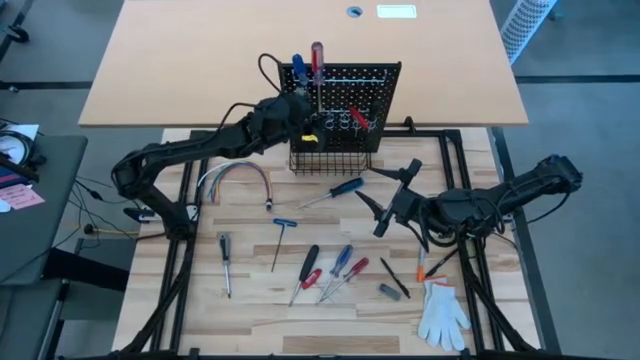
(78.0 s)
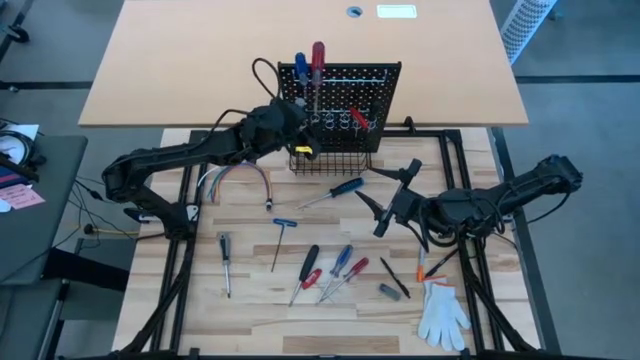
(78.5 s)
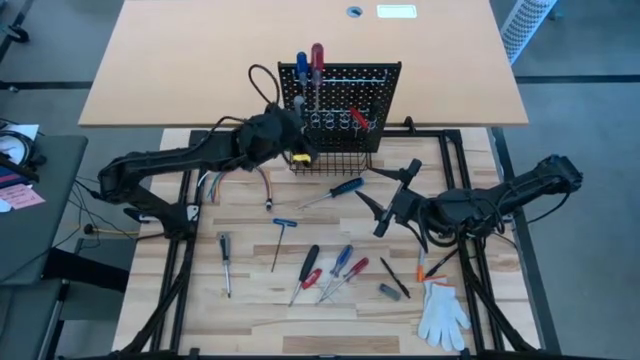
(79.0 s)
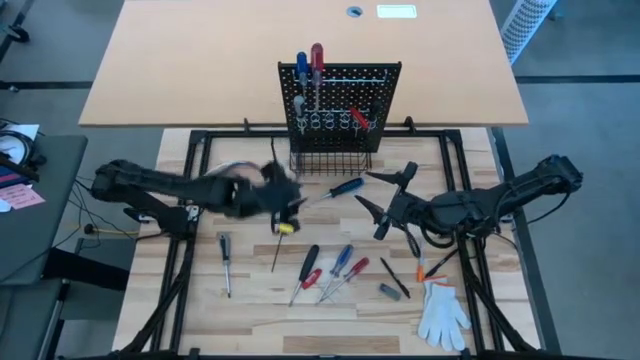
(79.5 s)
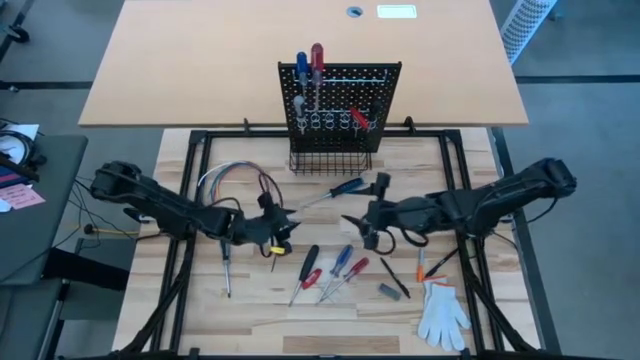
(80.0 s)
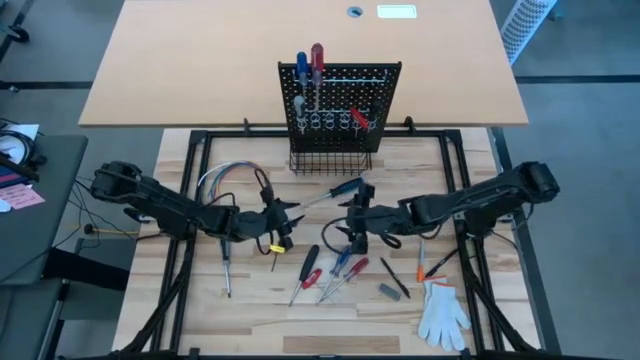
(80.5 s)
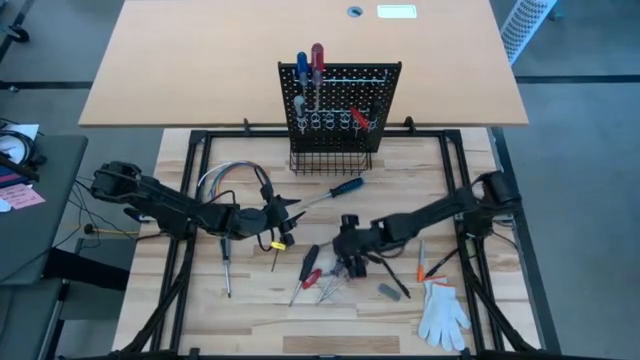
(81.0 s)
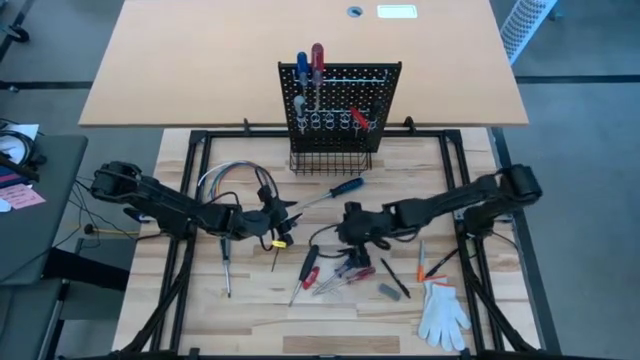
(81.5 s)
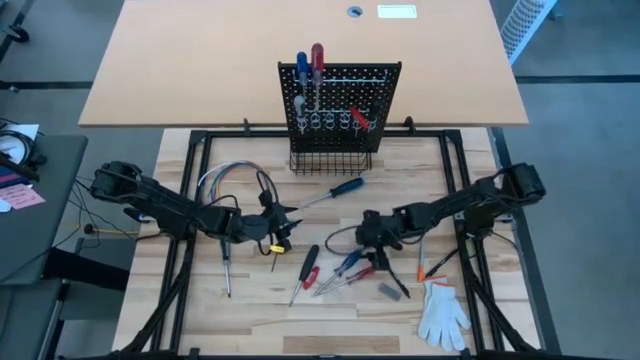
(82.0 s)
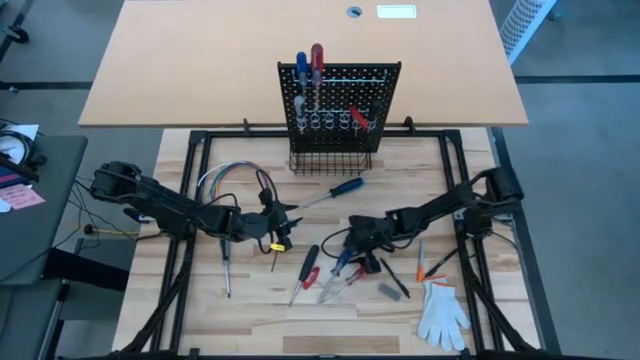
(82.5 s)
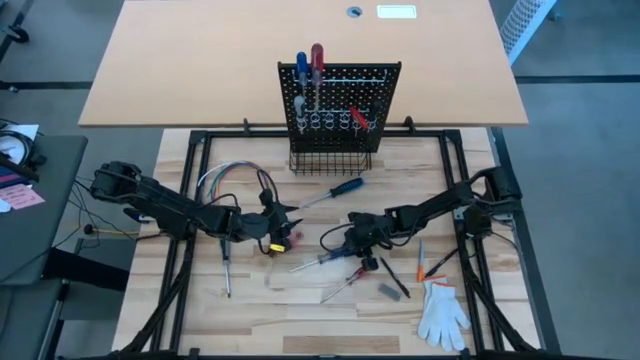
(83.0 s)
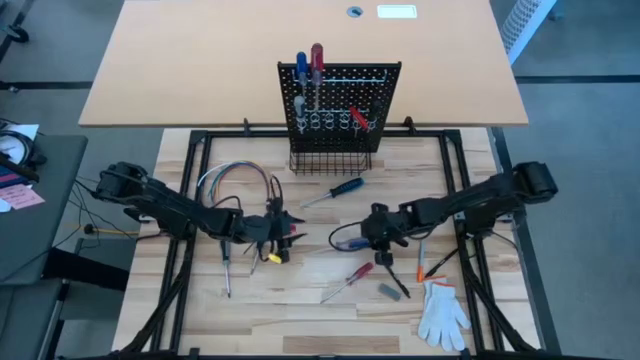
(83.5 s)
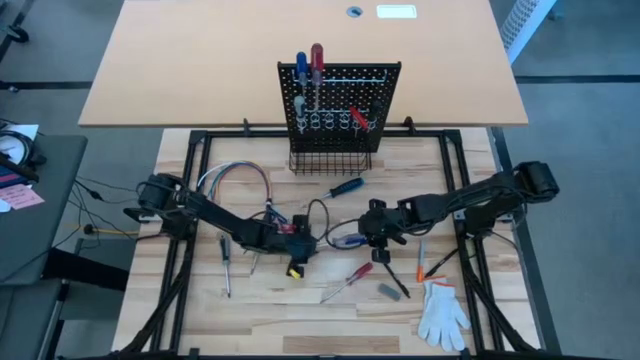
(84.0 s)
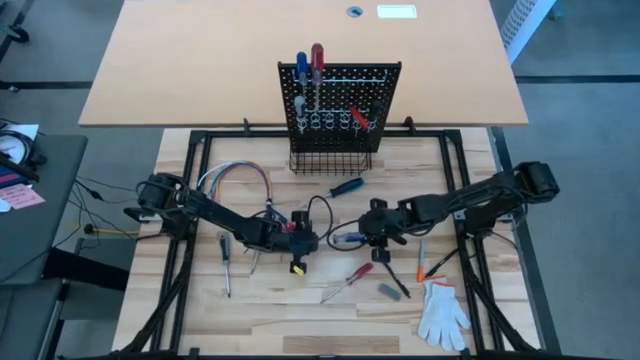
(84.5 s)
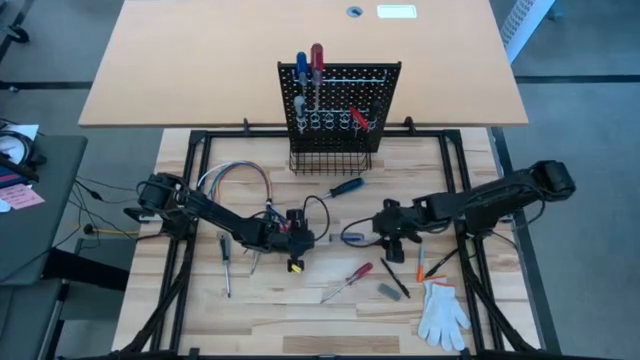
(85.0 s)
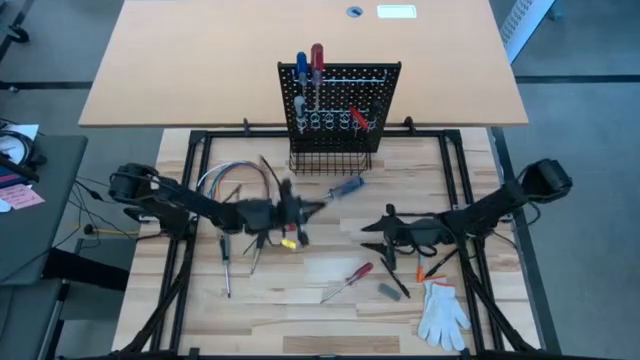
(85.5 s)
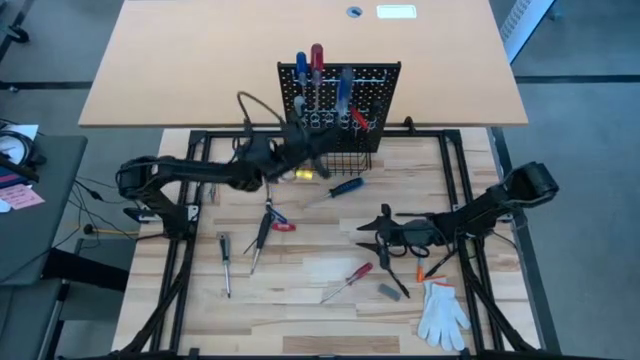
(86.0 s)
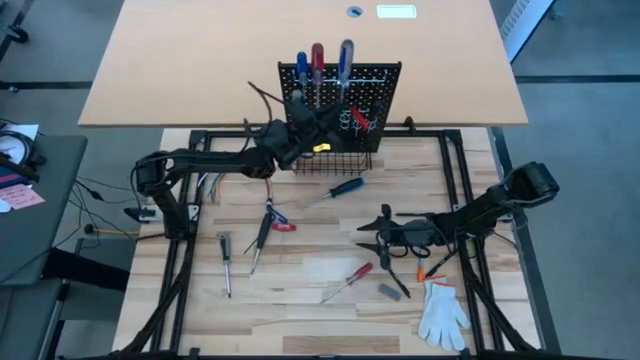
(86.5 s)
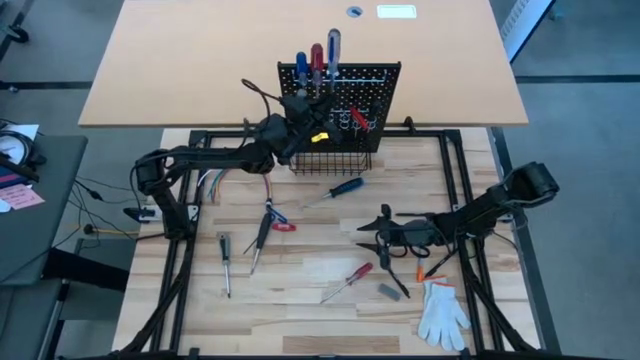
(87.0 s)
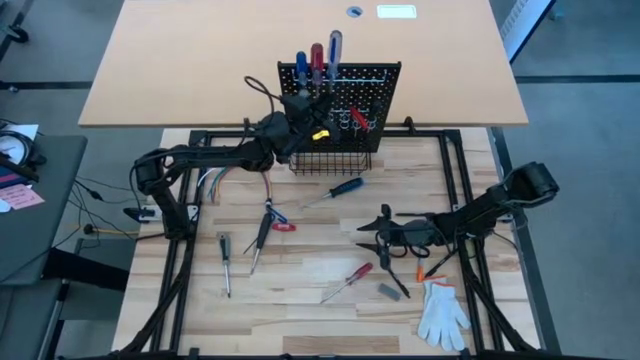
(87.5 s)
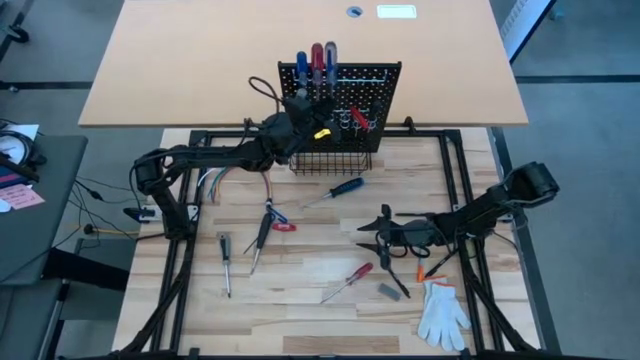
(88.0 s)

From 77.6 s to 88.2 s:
Task: Hang tools onto peg board
Hang the blue transparent screwdriver on the black peg board

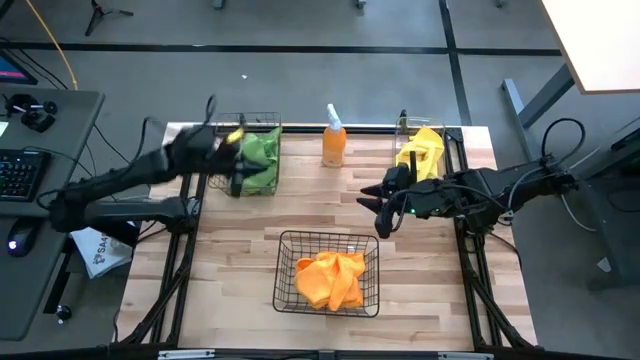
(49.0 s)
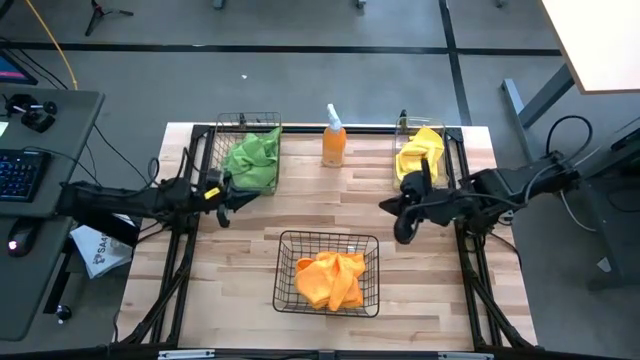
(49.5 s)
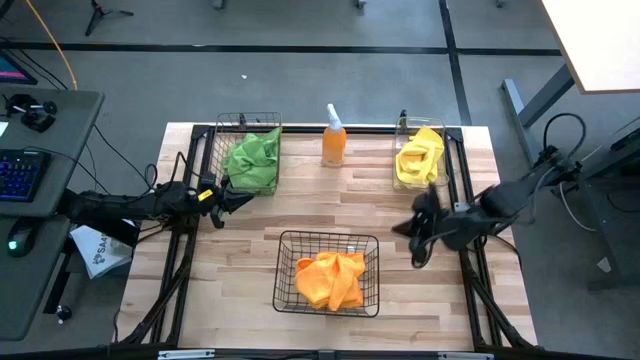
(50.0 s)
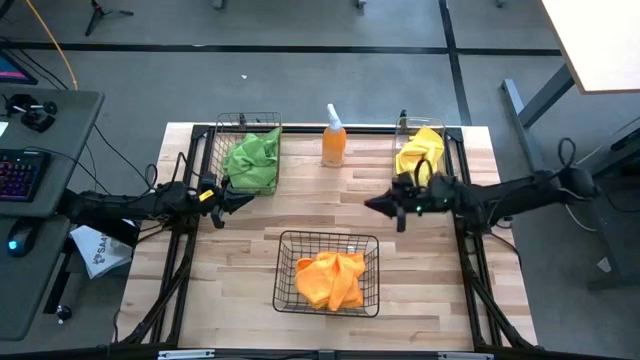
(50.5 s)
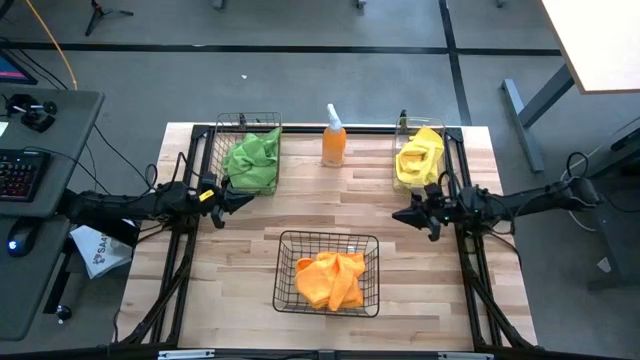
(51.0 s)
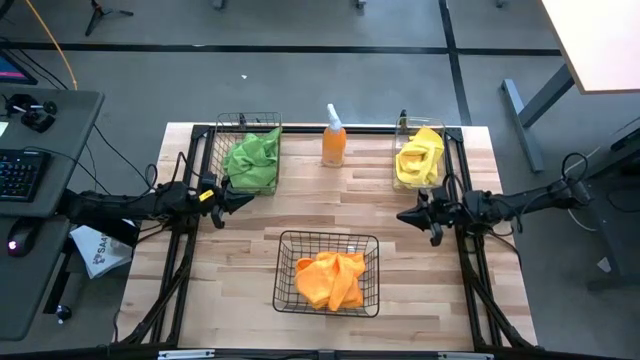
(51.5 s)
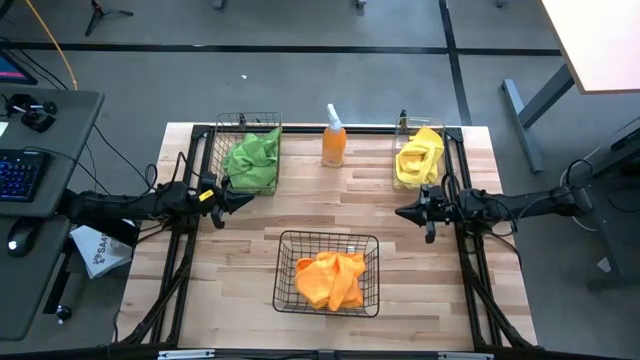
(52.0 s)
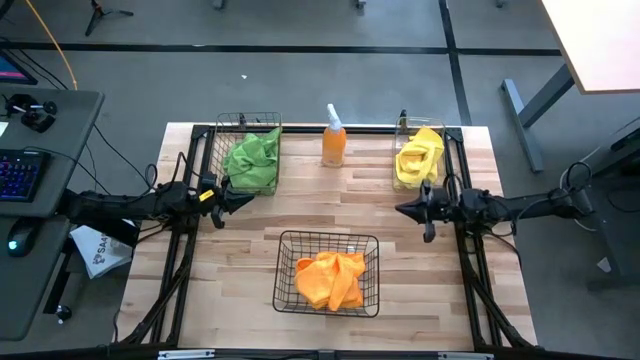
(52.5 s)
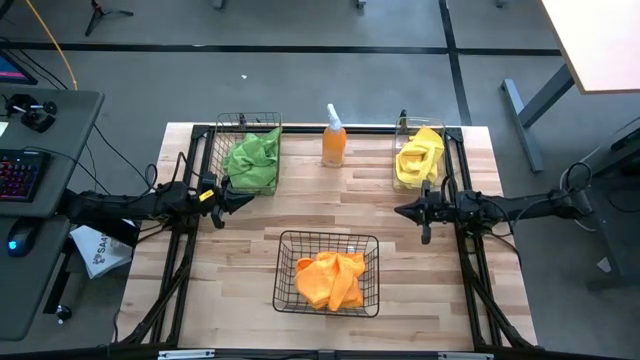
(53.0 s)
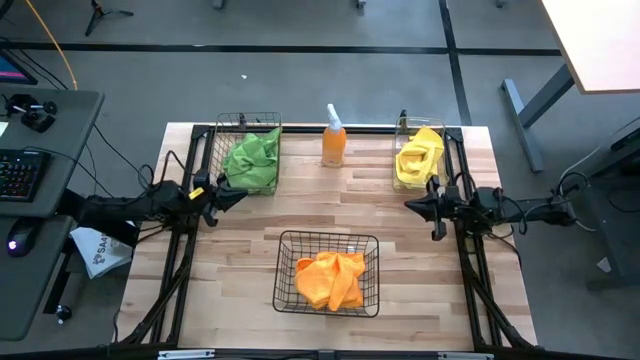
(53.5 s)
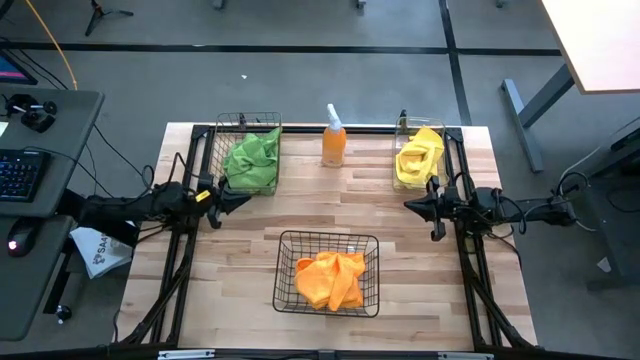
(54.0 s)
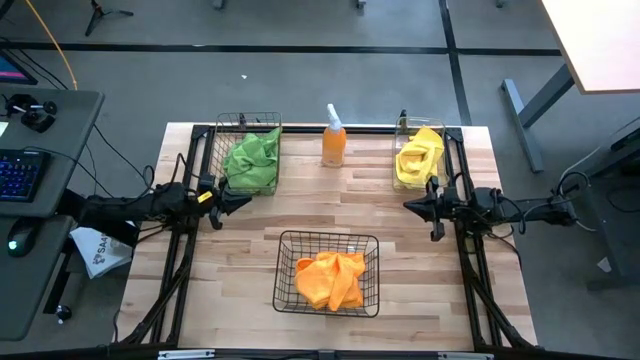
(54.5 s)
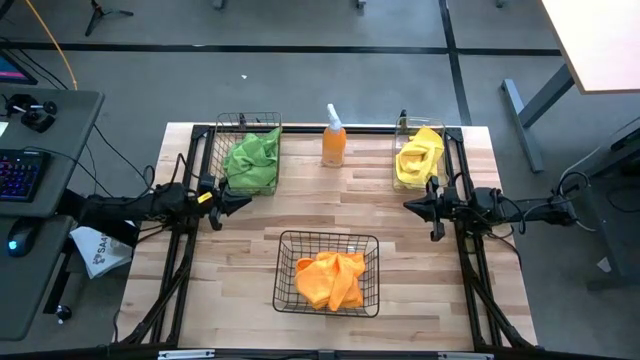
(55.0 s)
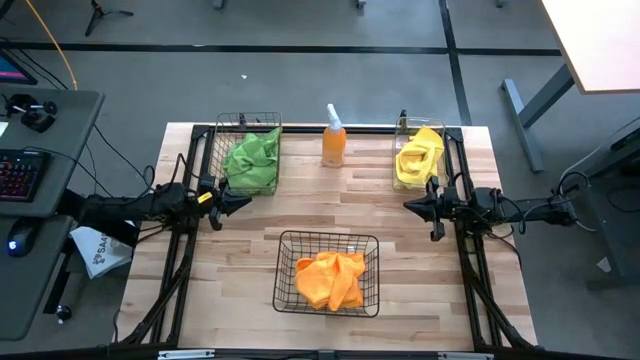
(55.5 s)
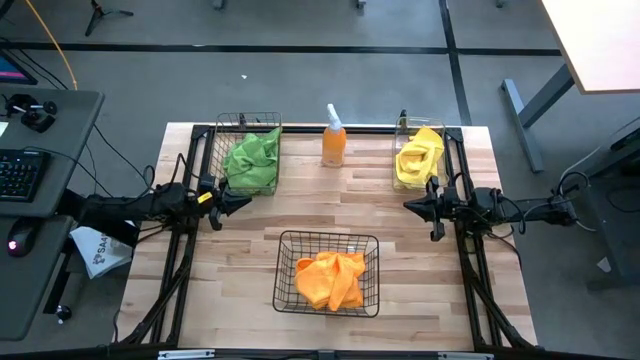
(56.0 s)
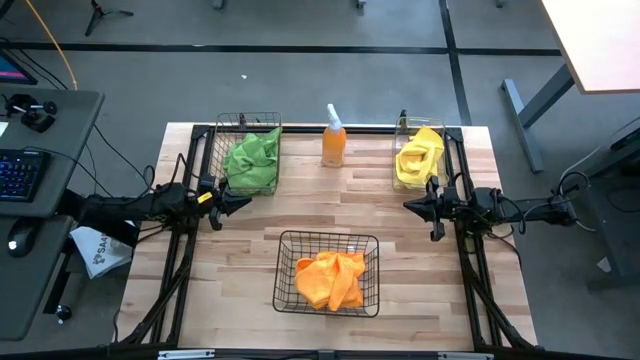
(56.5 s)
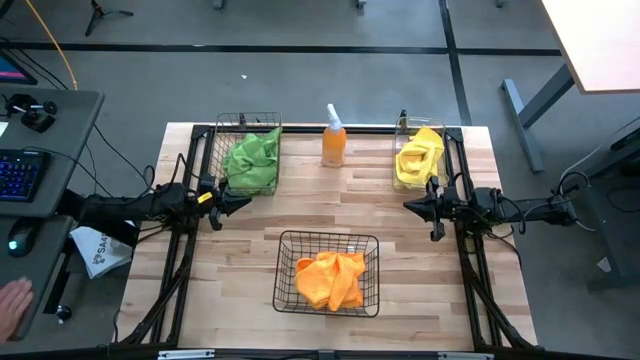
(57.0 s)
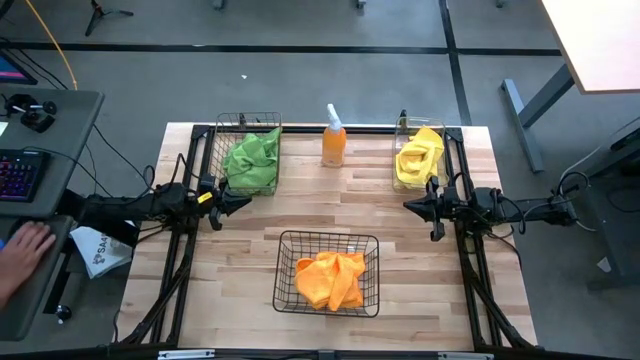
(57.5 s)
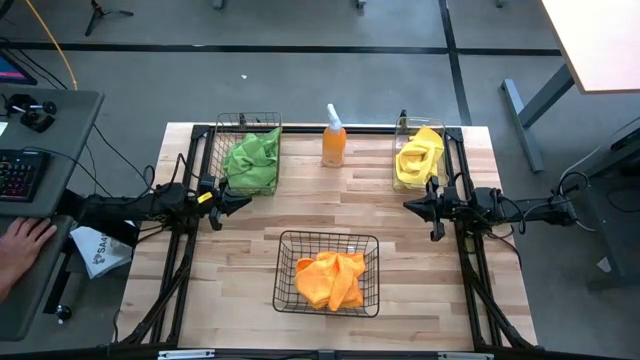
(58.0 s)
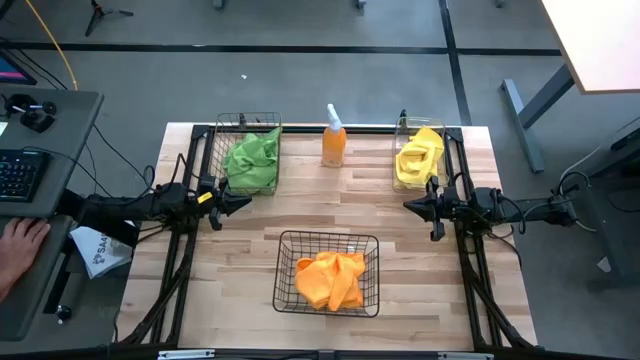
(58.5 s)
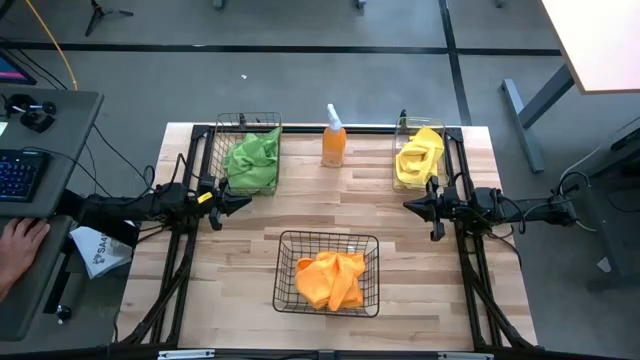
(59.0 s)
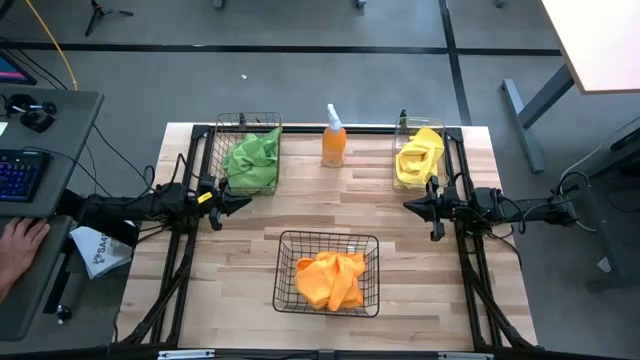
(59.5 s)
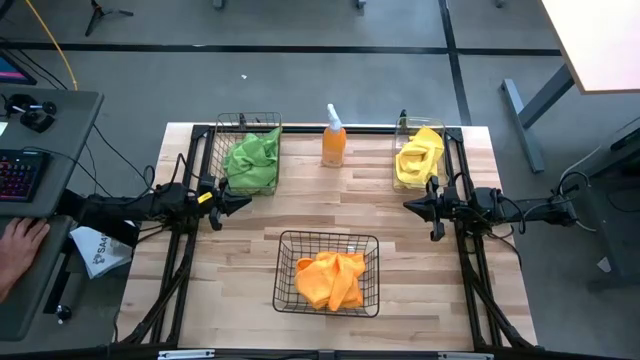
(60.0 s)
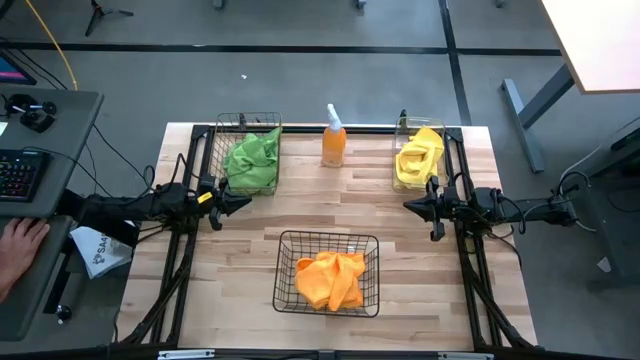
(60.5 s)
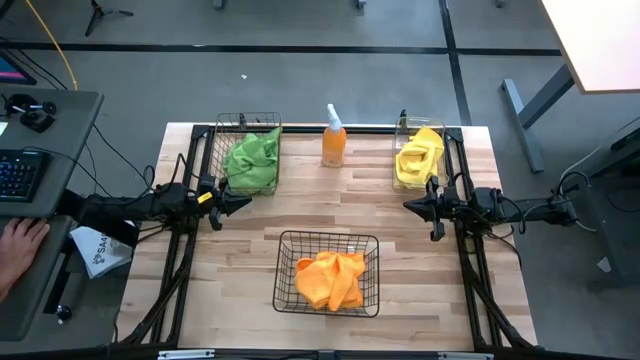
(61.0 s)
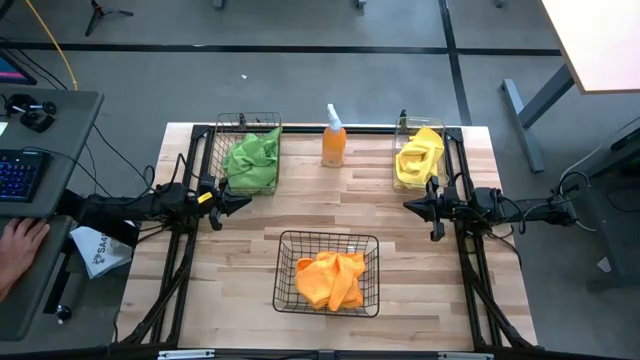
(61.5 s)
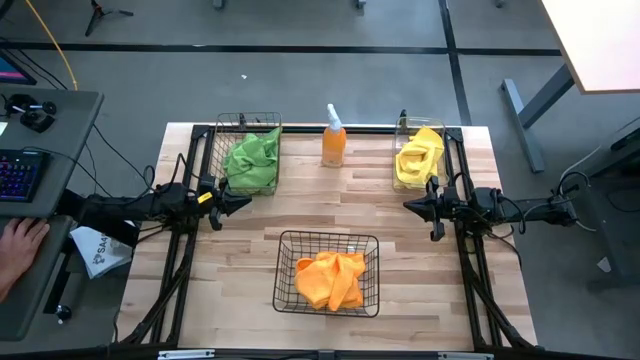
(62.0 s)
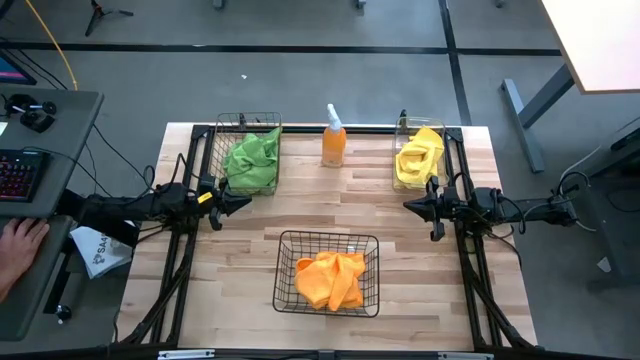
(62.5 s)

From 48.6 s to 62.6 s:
Task: Sort microfiber towel by color & place in baskets
Return to Home Position
